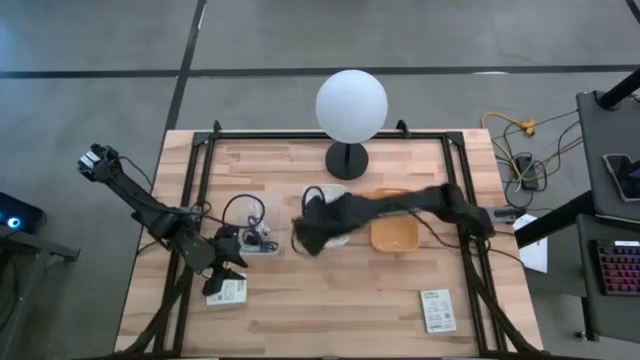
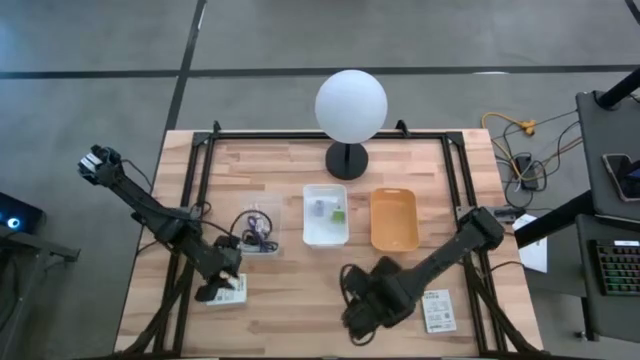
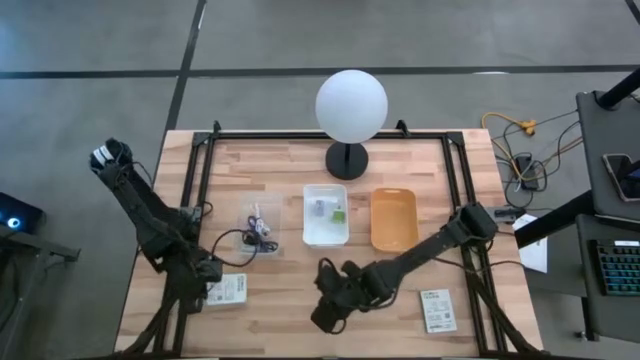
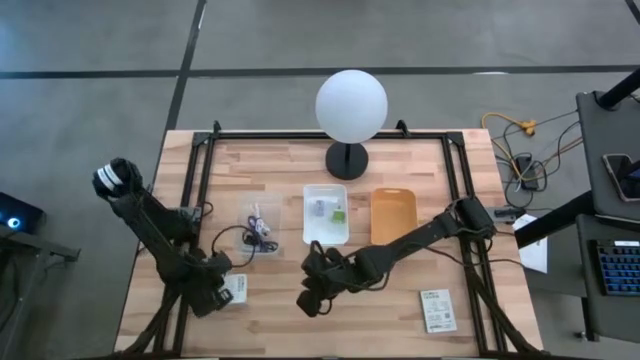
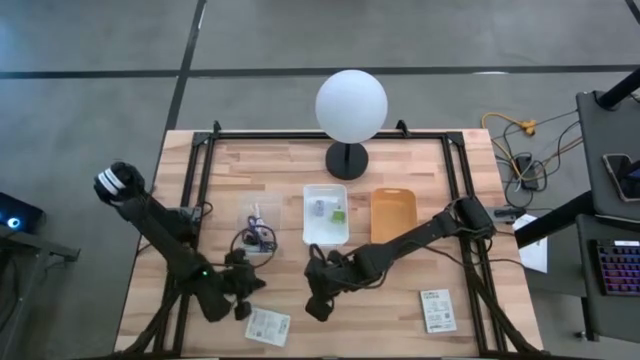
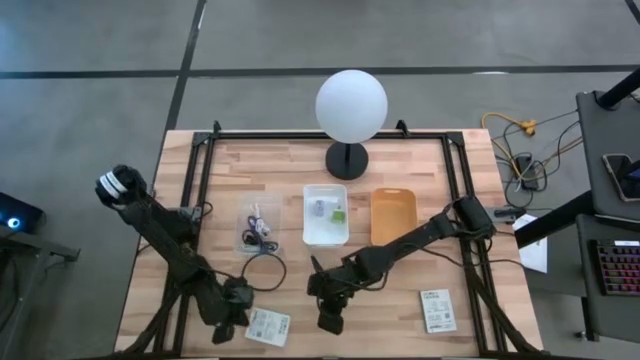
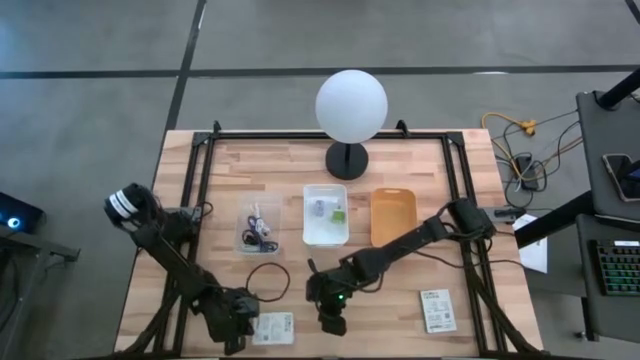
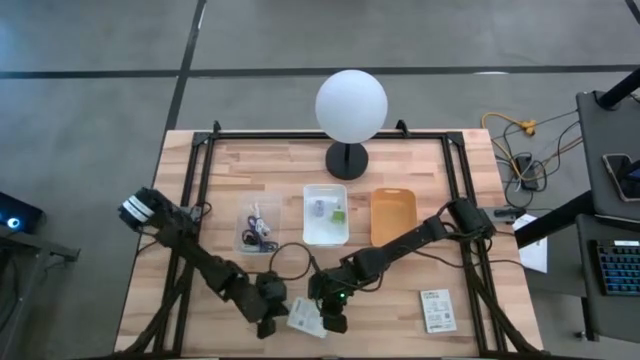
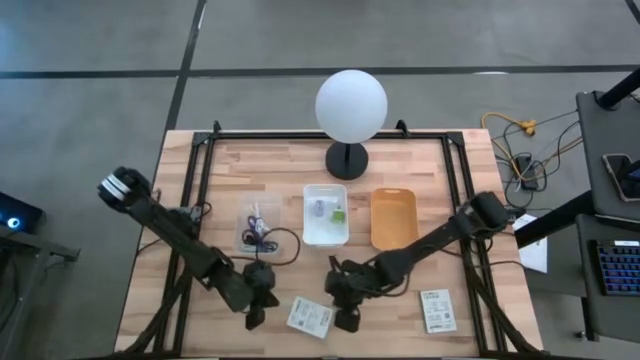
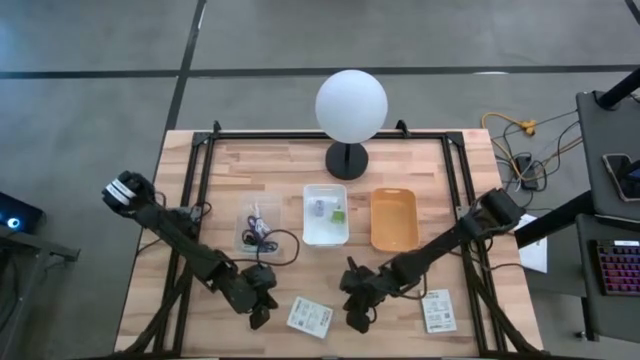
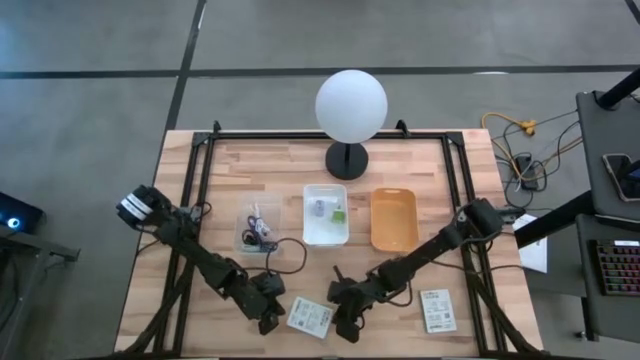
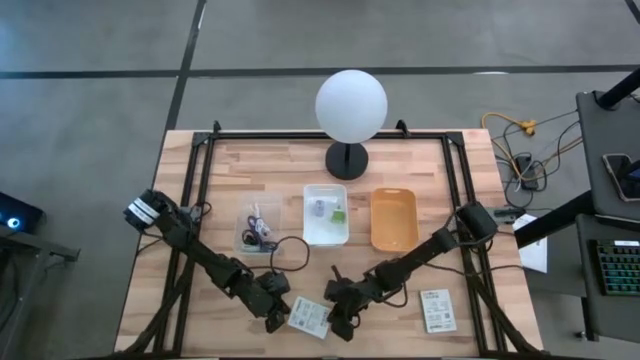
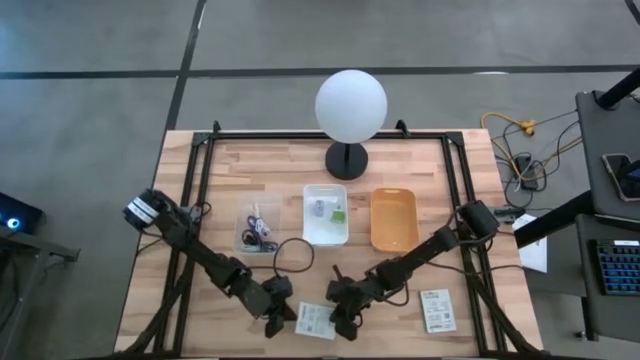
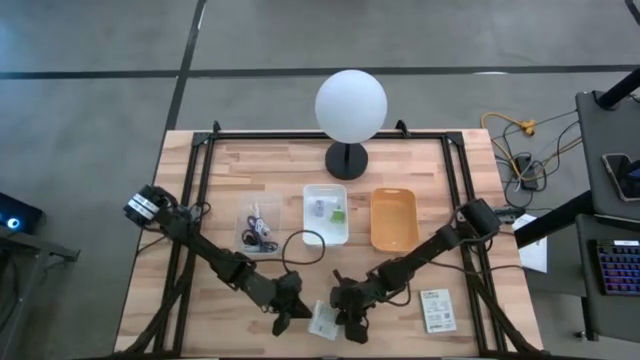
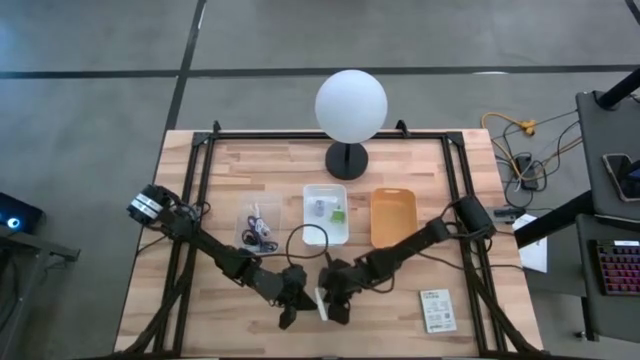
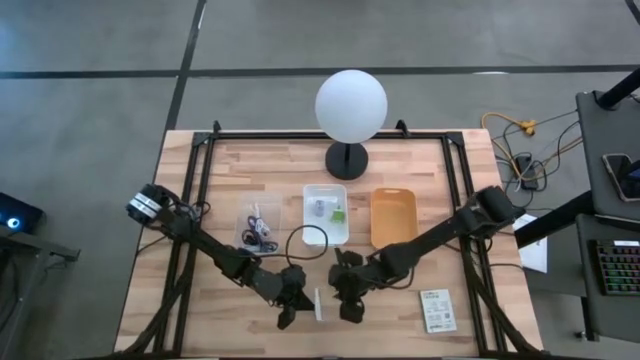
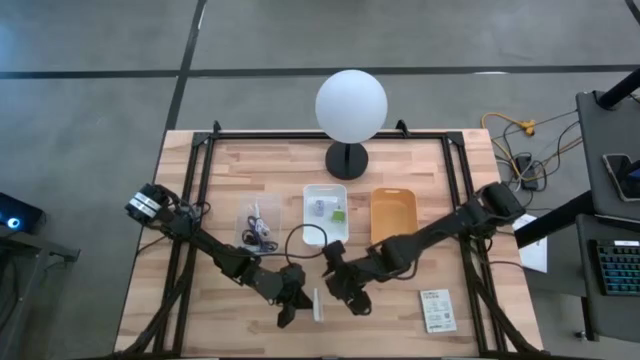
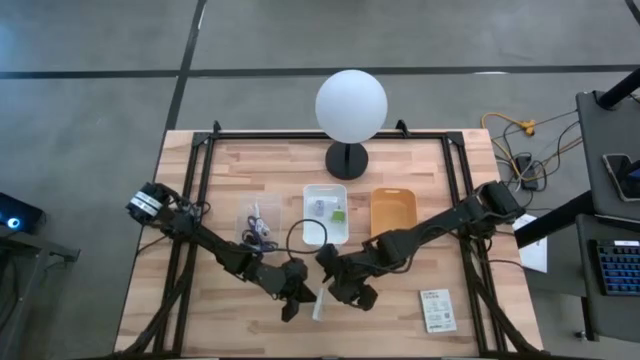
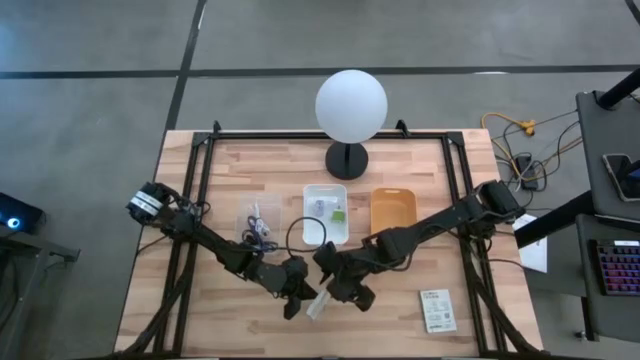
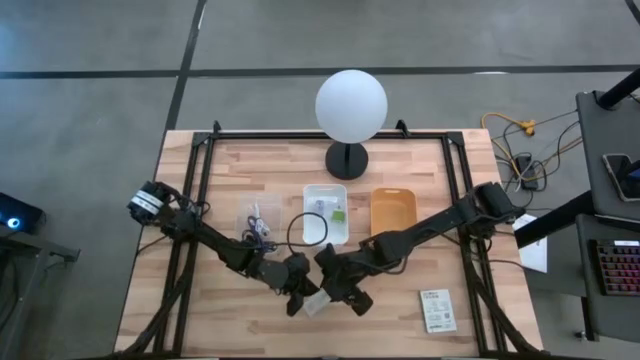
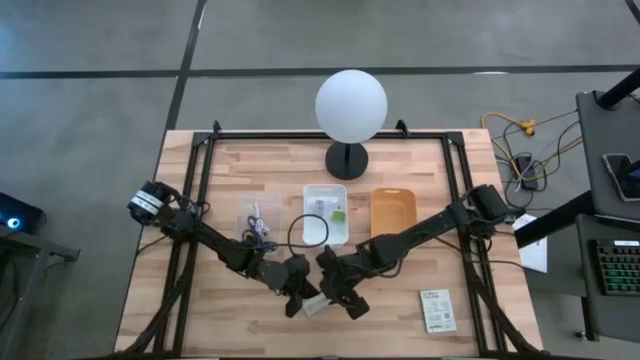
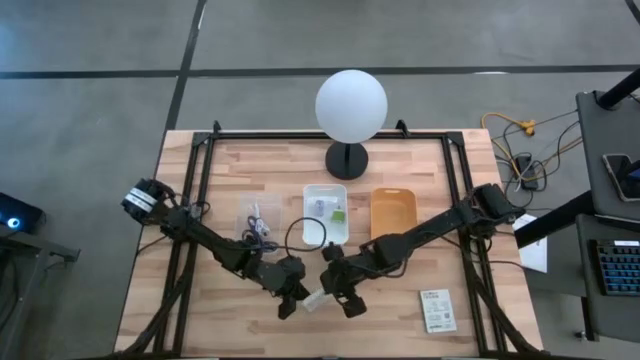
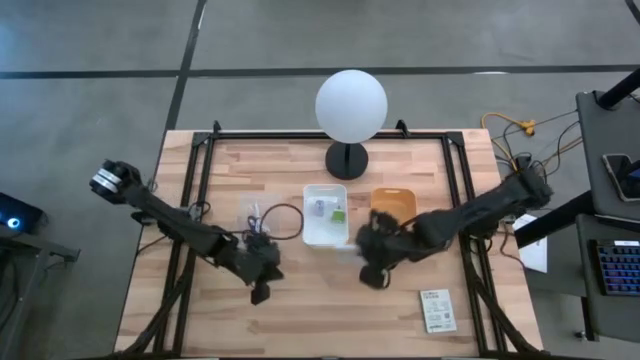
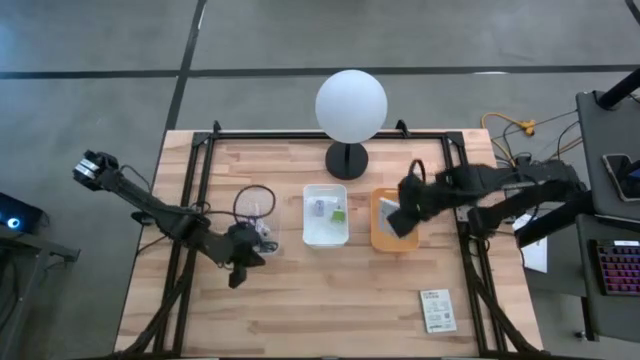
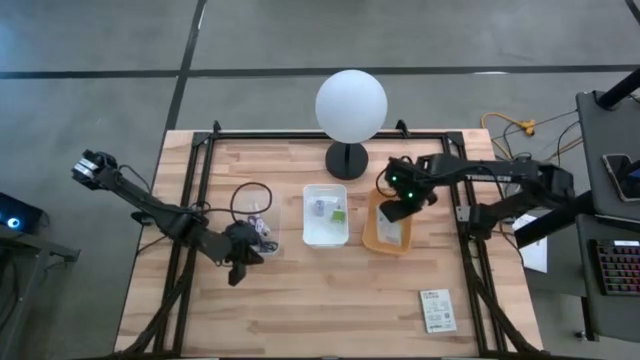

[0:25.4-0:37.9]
Task: Pick and place items into bin
Put the left white card reader box into the yellow bin

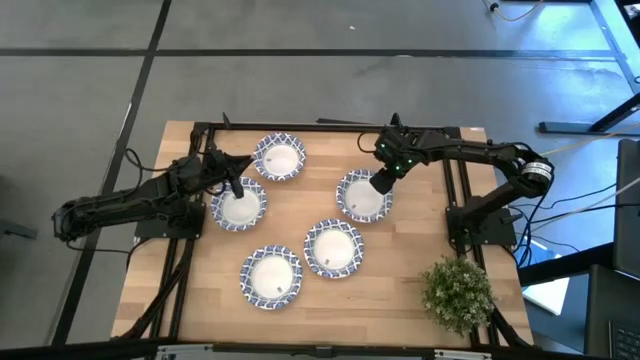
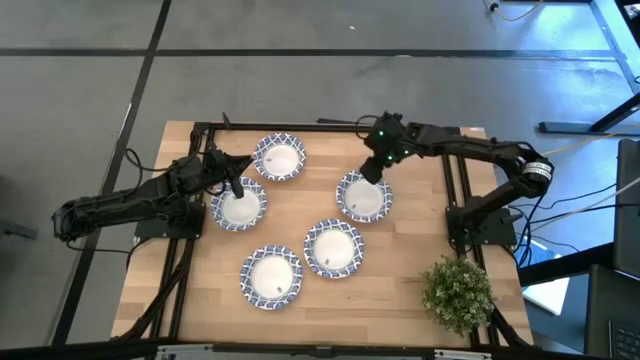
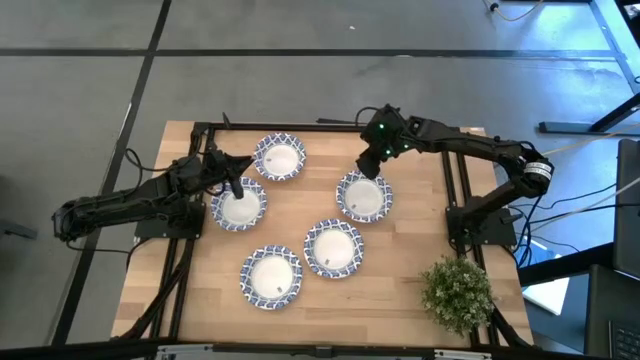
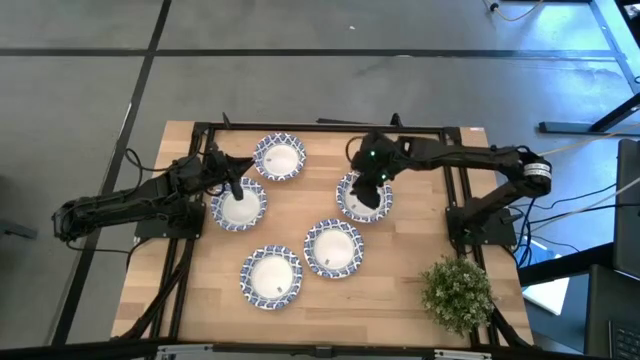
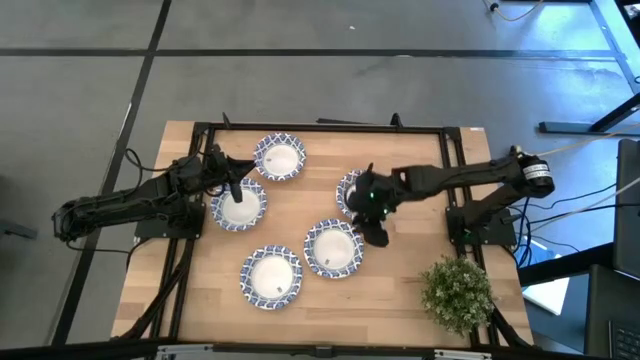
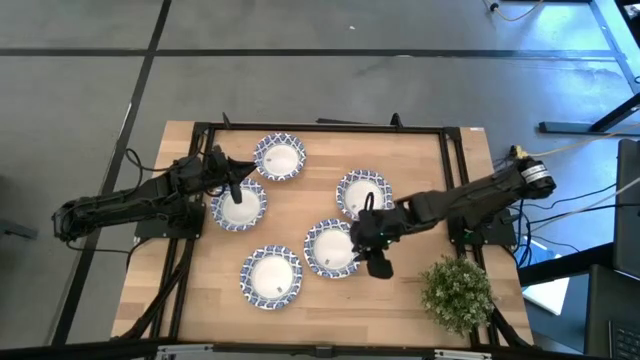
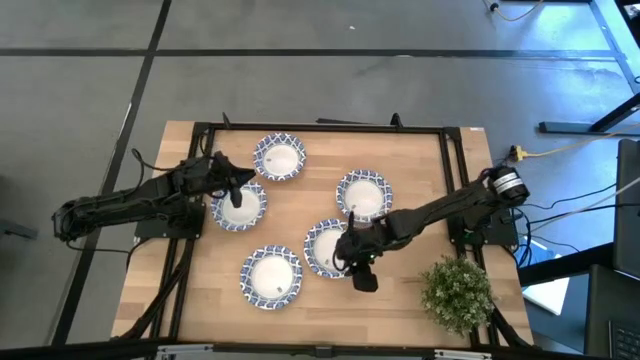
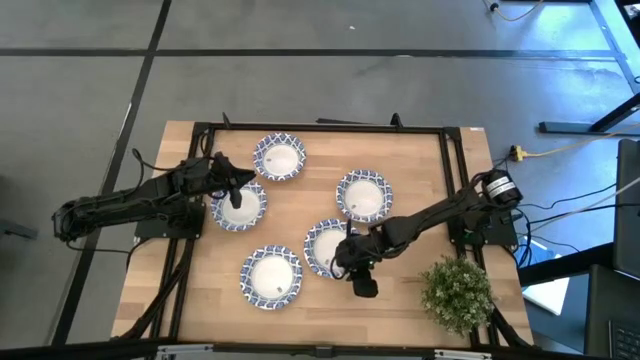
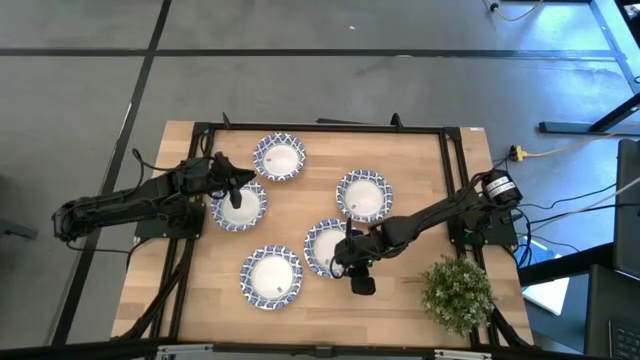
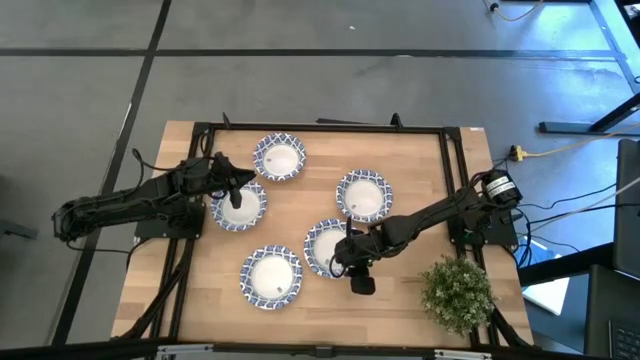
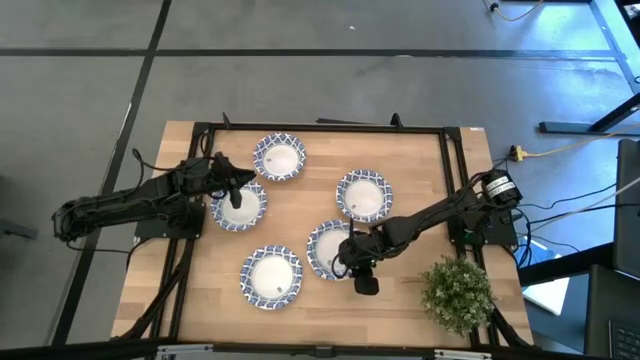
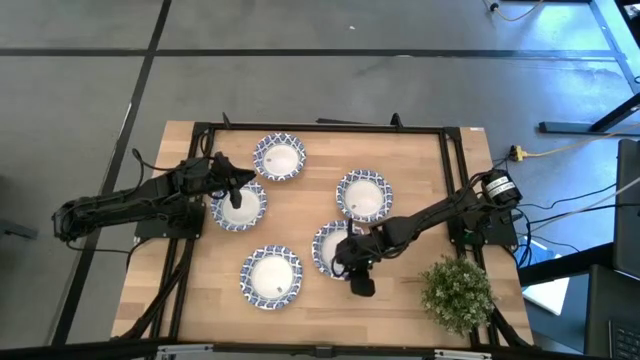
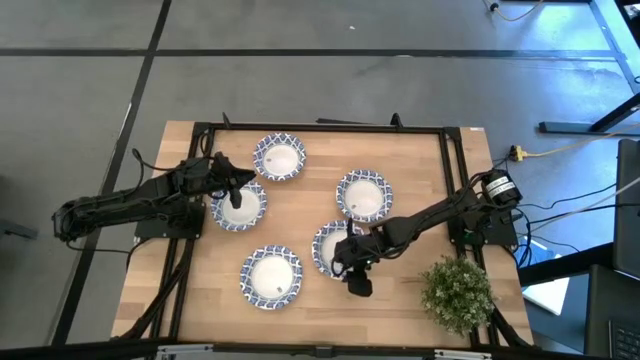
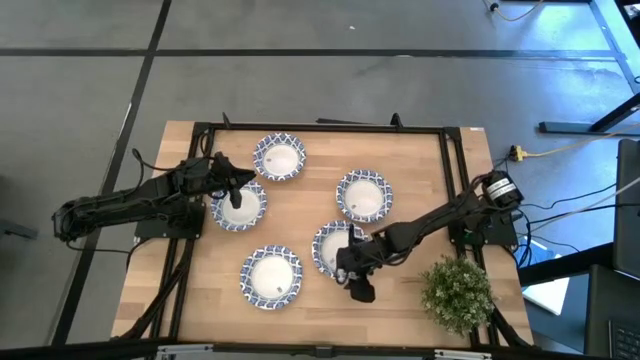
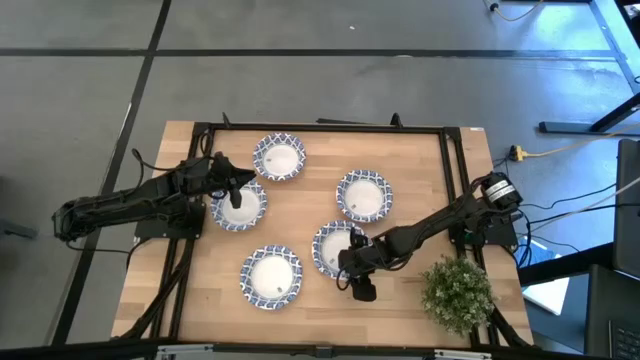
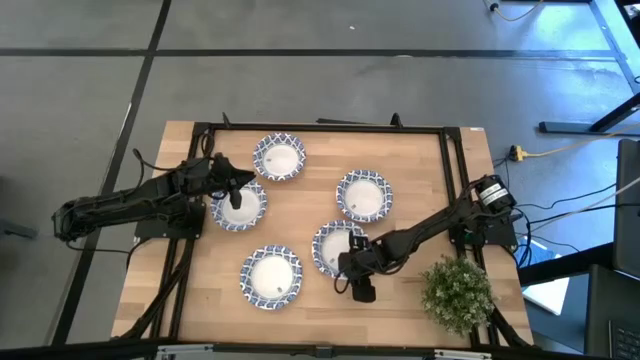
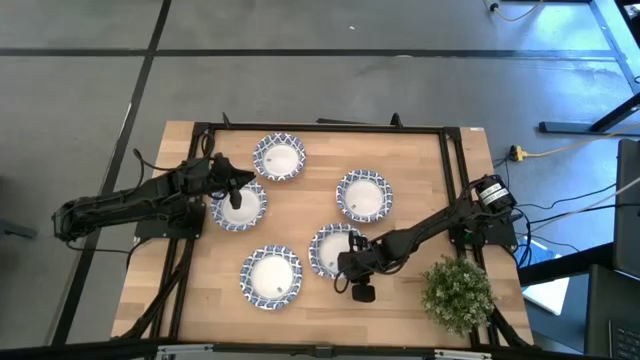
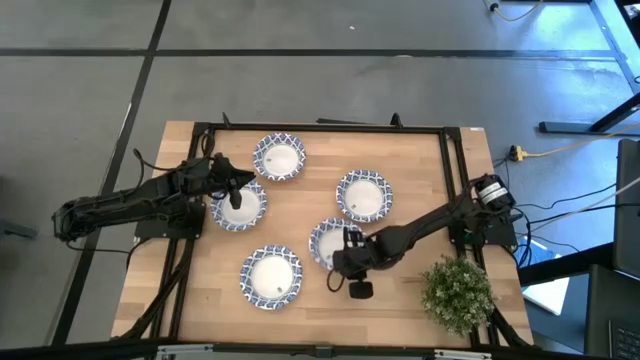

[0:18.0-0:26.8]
Task: Nest bowls inside each other
Stack the blue bowl on the blue bowl
